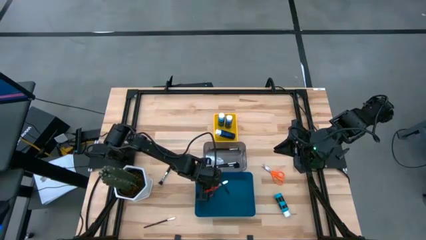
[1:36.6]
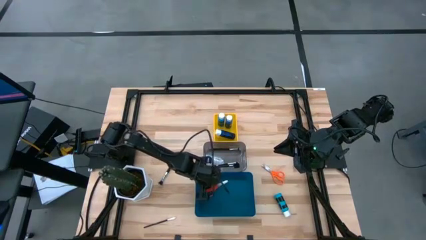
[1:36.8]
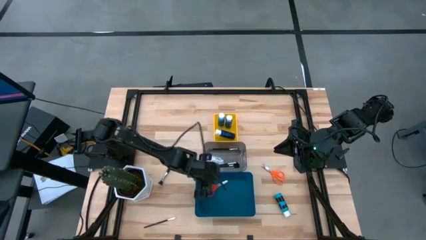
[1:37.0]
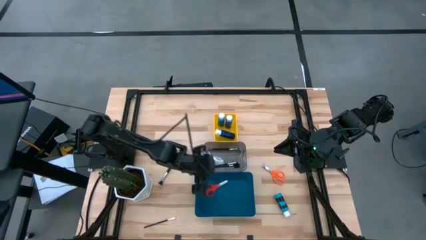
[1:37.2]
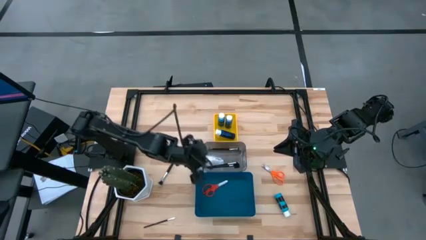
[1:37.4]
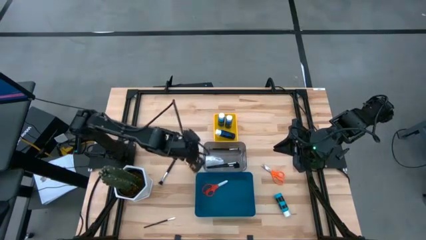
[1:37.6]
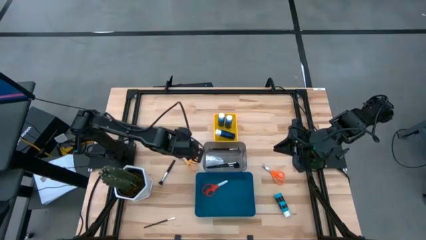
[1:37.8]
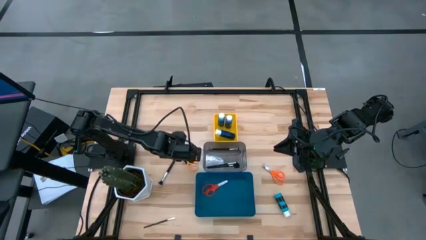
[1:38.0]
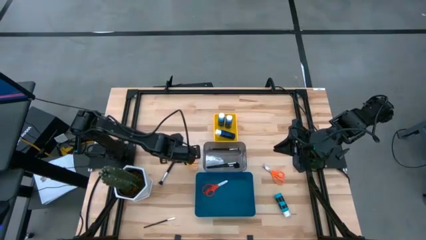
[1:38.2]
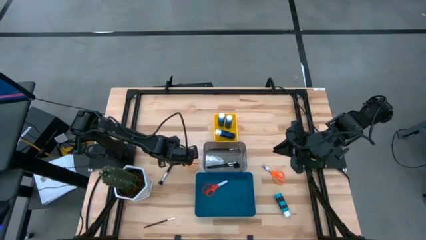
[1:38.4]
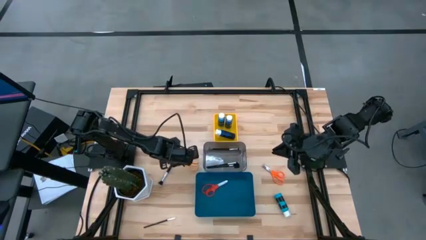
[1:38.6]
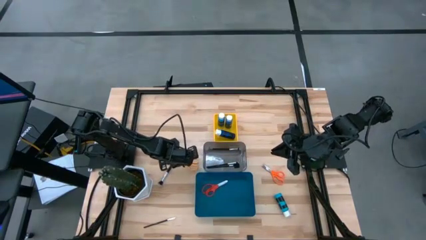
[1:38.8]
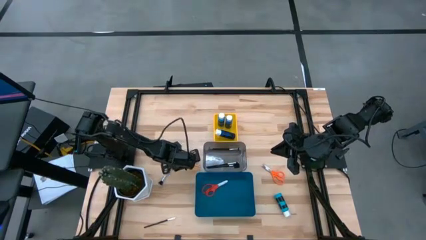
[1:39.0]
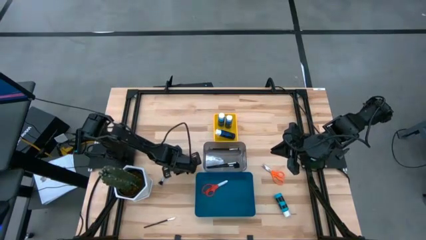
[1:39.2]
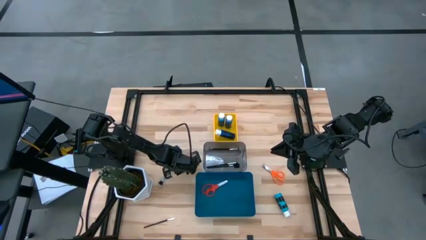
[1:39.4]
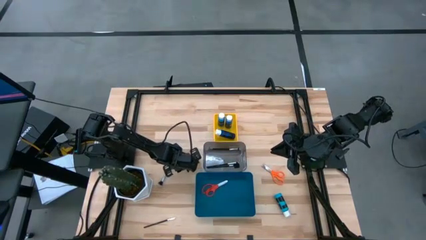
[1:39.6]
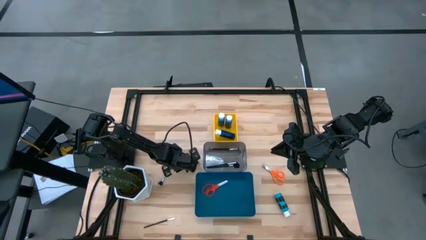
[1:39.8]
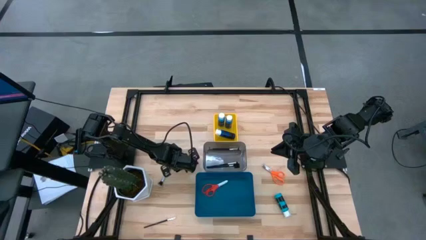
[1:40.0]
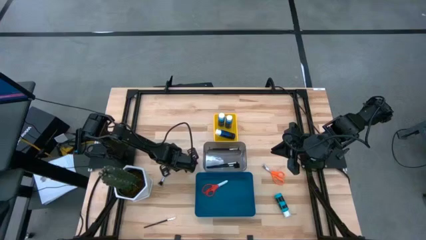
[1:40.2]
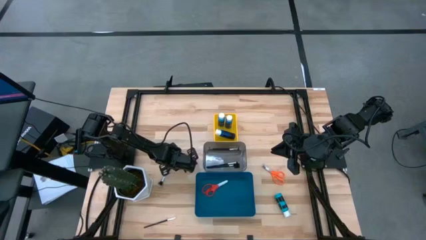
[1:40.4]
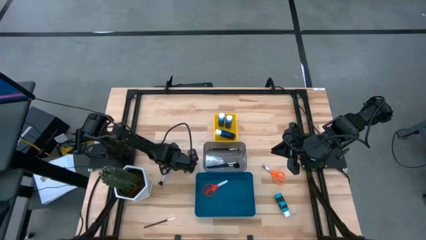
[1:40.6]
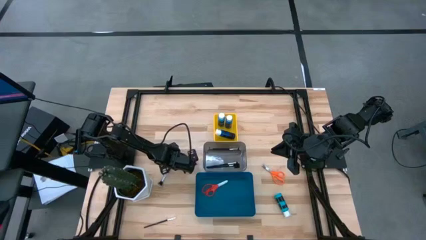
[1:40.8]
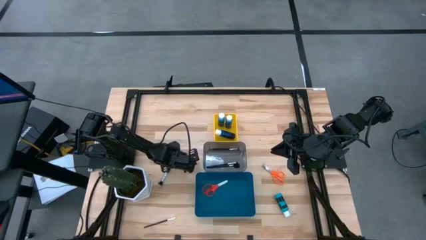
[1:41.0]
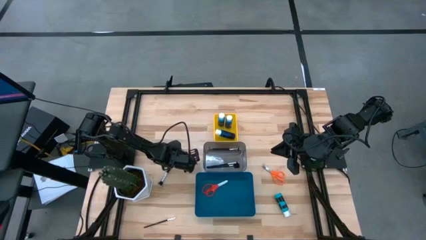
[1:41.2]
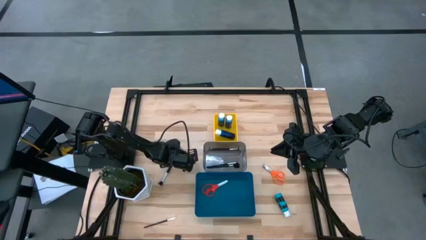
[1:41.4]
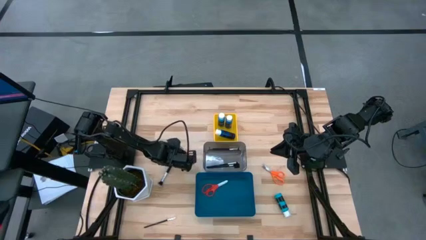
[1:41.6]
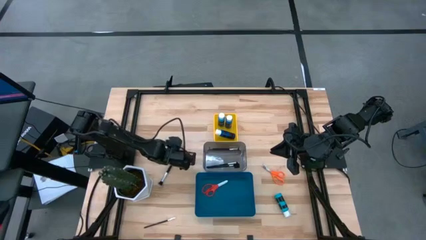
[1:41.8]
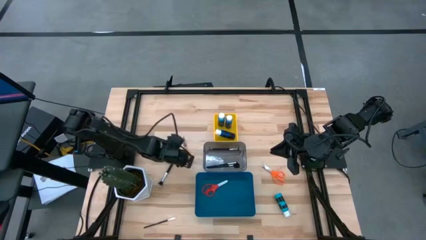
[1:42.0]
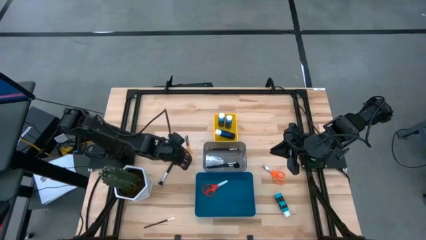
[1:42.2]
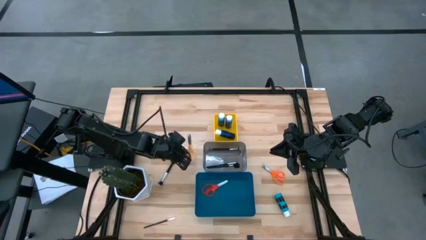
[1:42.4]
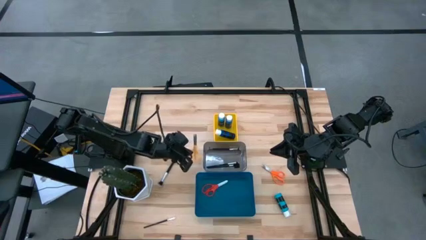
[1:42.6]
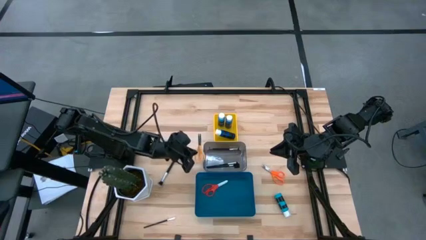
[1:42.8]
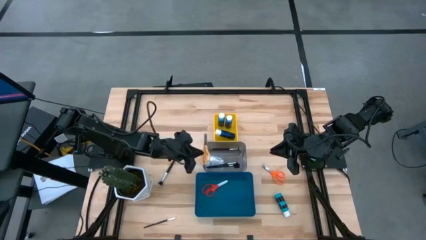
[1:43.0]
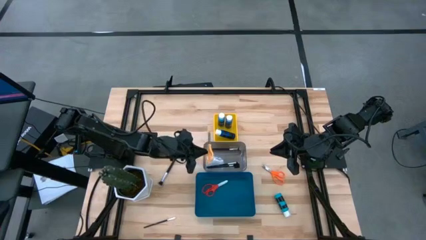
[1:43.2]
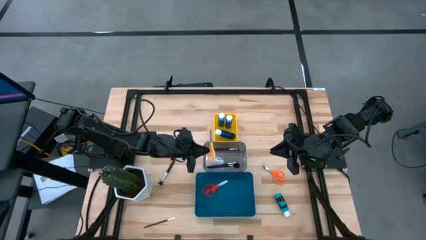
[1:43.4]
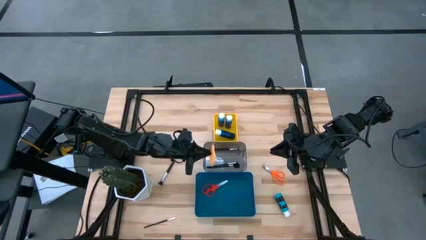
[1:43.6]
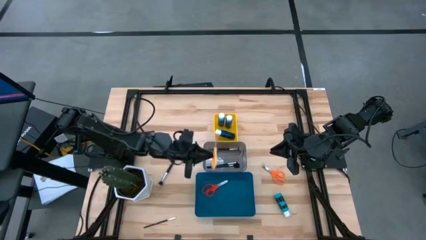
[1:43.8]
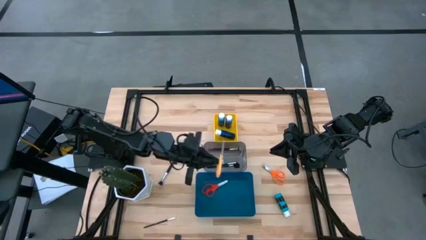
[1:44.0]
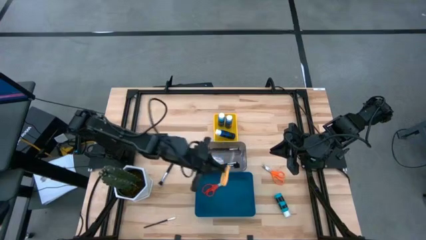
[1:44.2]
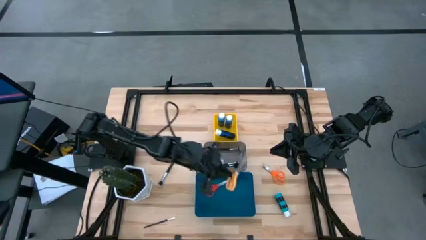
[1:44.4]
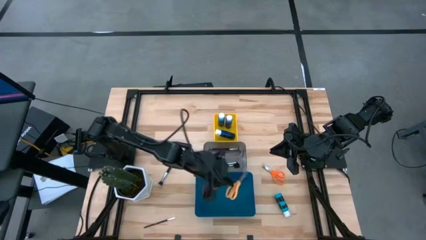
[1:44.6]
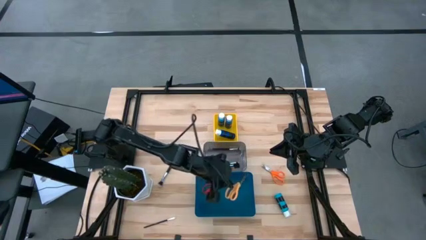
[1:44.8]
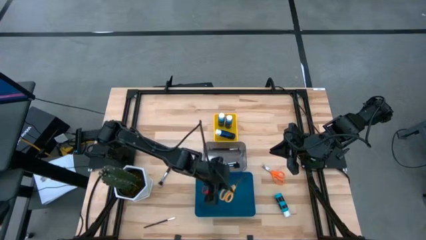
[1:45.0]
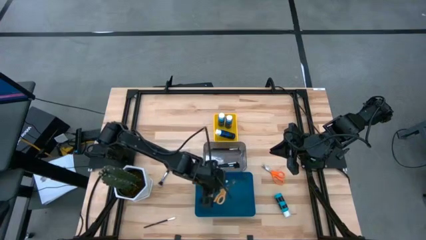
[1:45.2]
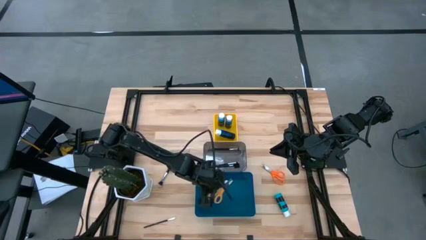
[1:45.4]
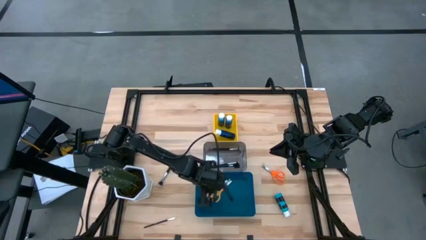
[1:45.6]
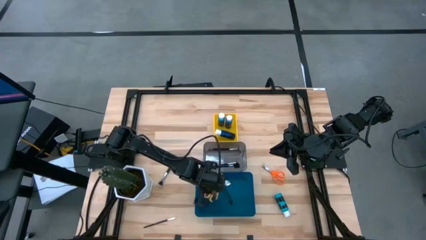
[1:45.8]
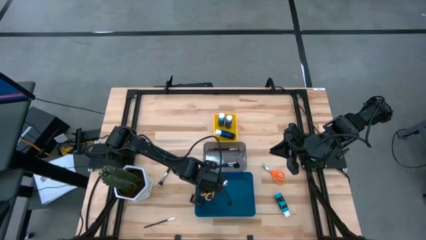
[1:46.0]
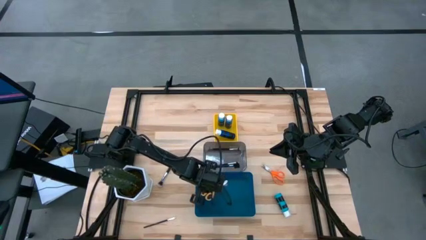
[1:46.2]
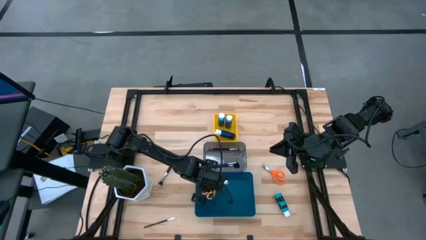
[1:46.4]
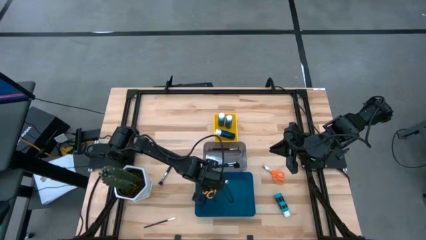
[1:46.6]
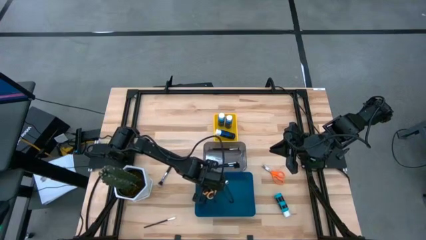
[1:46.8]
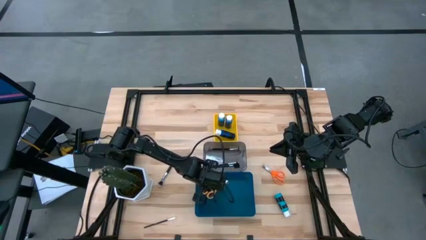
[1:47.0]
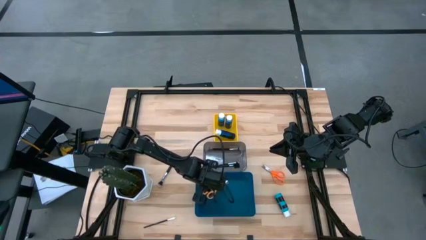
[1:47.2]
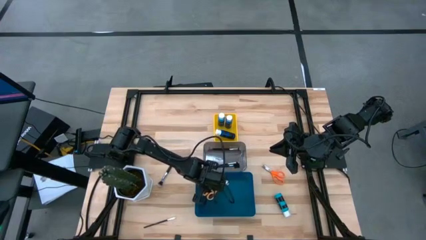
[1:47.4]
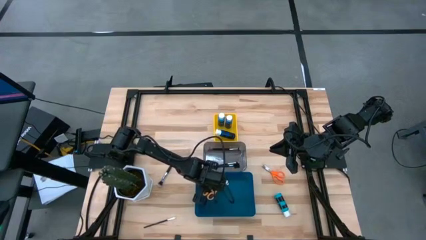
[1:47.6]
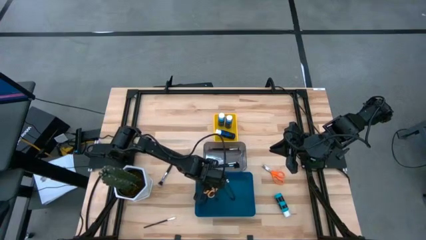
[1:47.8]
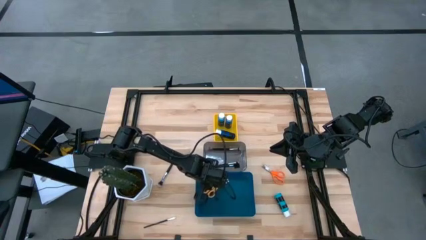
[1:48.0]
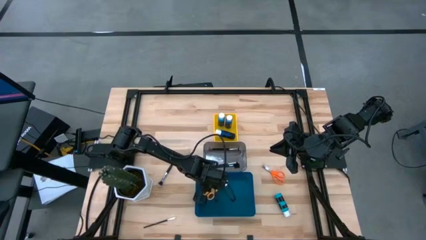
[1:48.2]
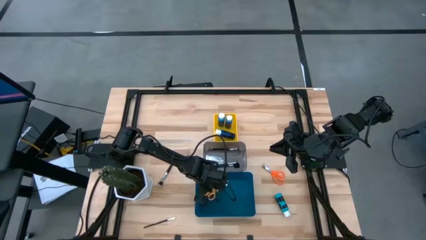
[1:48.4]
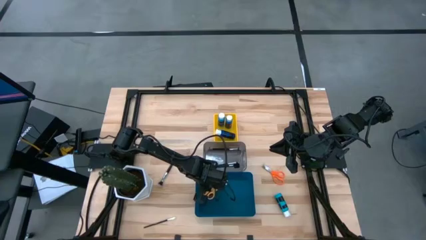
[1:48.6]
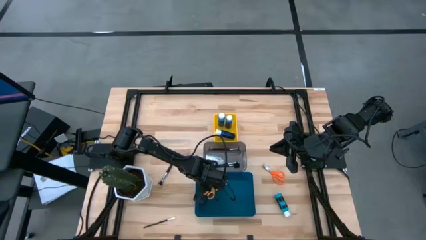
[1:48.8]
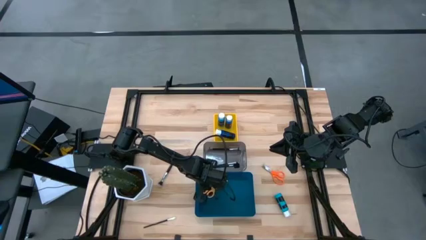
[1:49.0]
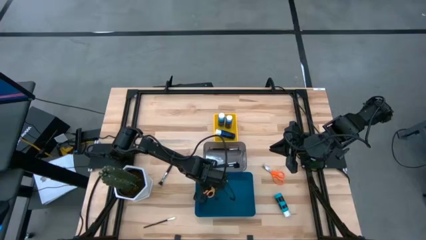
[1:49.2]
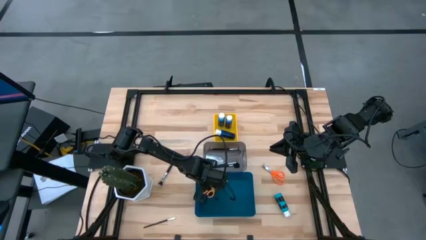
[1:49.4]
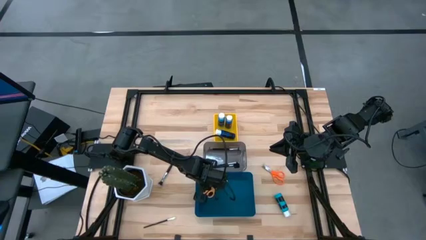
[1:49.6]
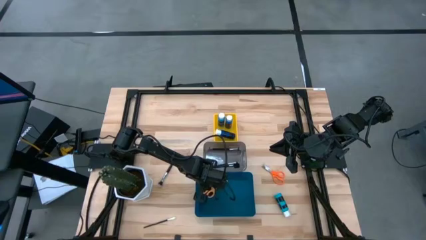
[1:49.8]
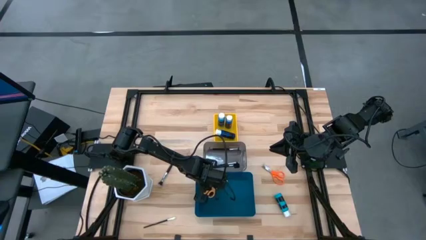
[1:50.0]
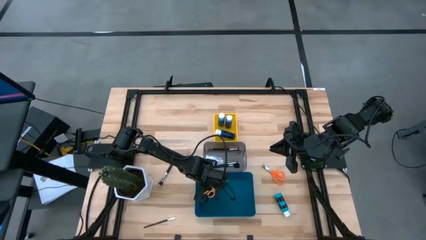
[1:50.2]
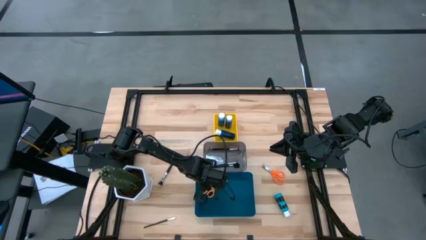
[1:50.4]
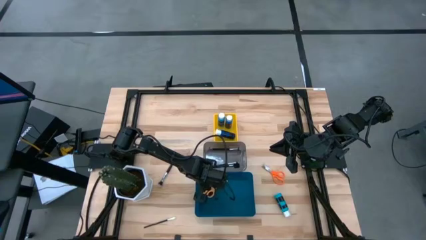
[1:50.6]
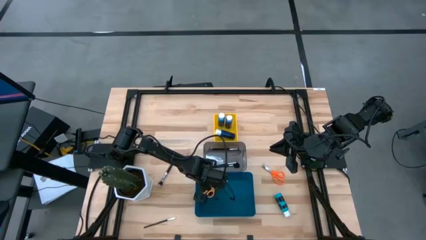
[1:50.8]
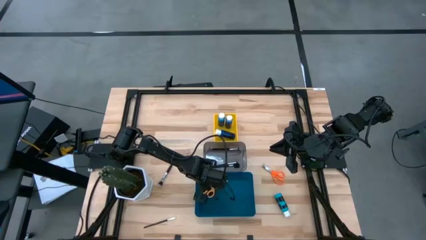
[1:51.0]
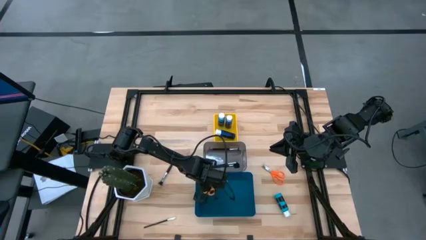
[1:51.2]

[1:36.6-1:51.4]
Task: Pick & Place Paint Supplies
Put the yellow scissors into the blue bin
